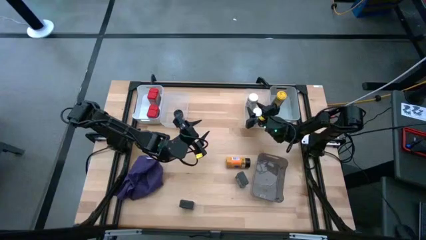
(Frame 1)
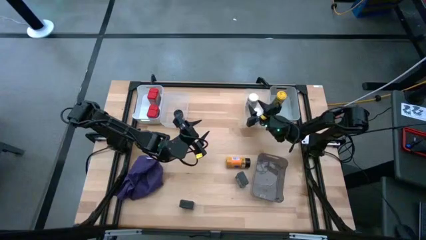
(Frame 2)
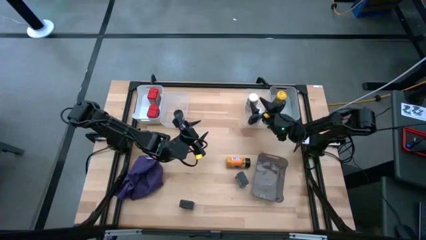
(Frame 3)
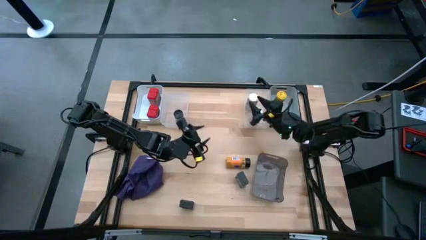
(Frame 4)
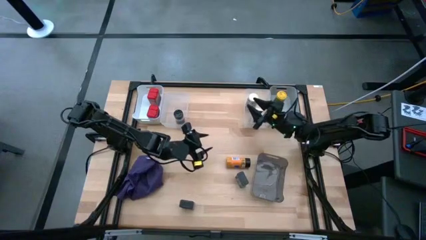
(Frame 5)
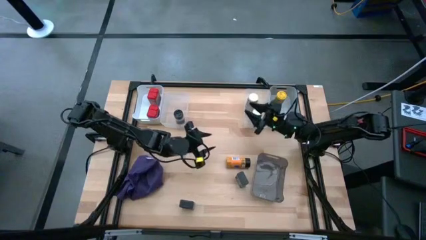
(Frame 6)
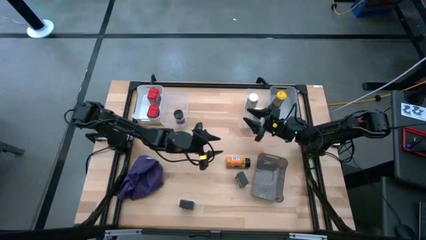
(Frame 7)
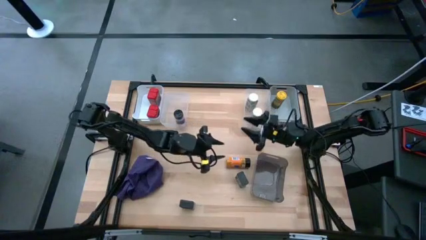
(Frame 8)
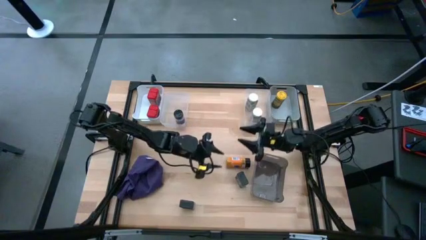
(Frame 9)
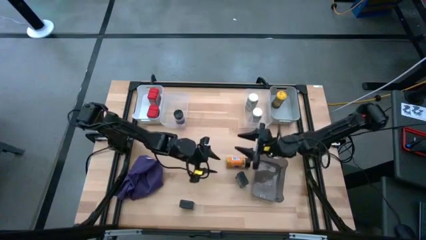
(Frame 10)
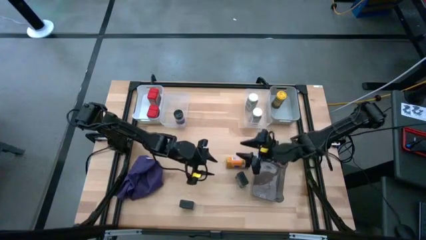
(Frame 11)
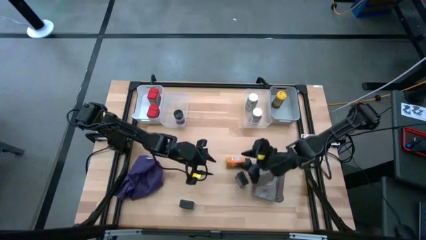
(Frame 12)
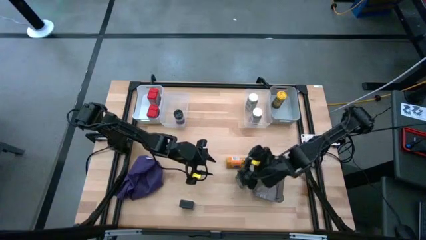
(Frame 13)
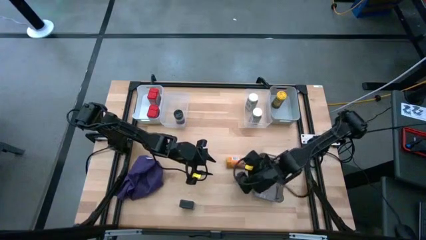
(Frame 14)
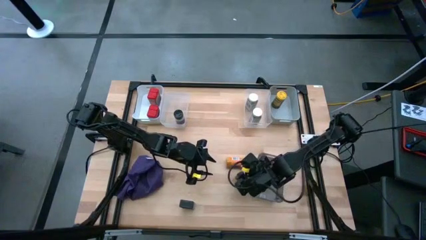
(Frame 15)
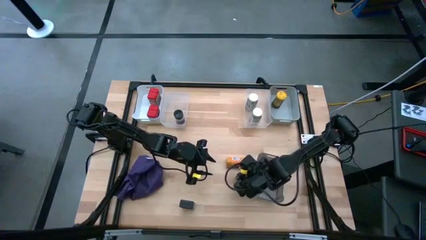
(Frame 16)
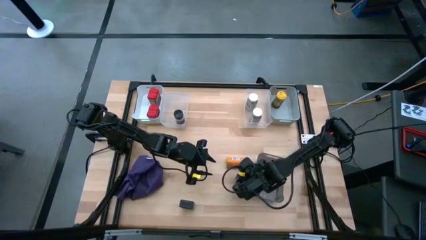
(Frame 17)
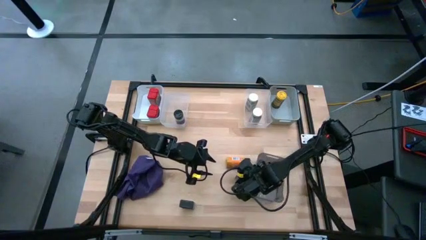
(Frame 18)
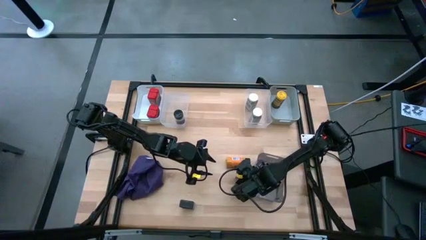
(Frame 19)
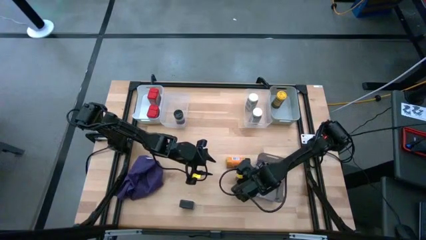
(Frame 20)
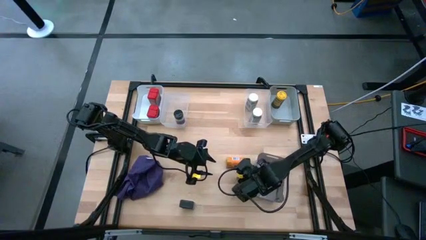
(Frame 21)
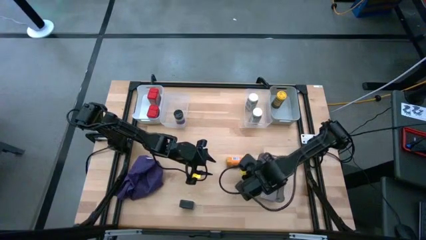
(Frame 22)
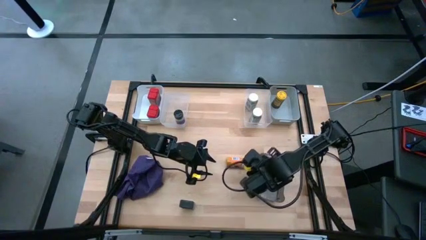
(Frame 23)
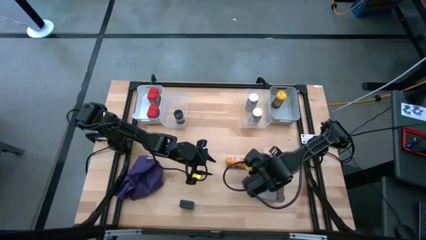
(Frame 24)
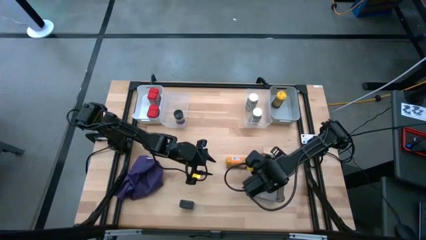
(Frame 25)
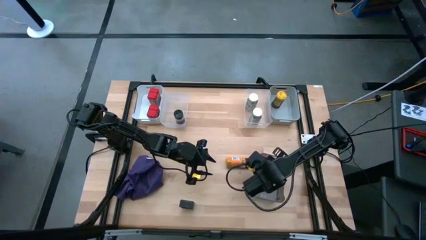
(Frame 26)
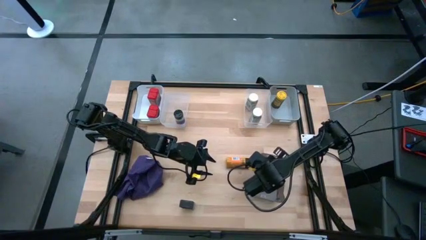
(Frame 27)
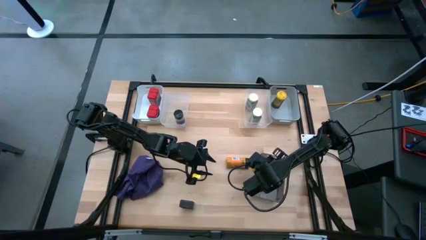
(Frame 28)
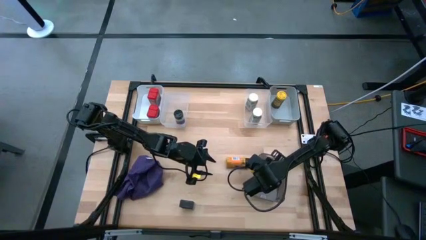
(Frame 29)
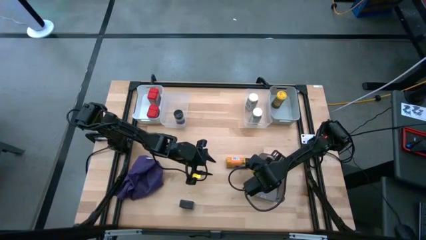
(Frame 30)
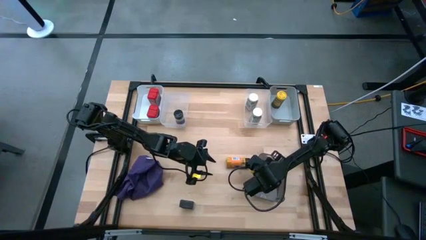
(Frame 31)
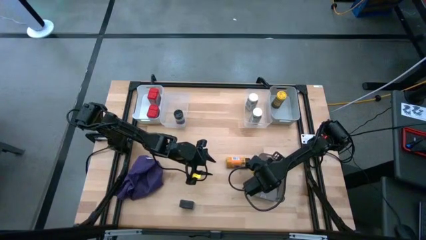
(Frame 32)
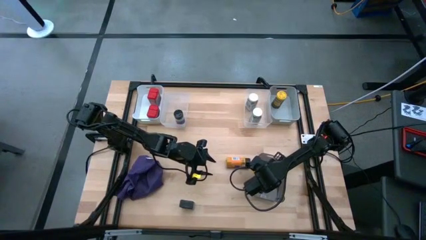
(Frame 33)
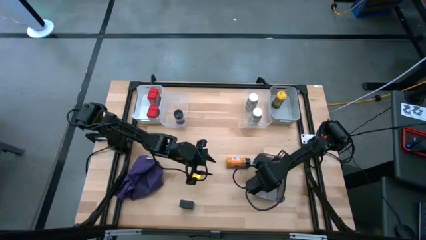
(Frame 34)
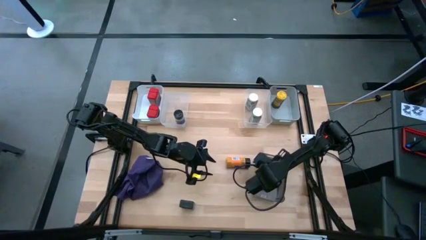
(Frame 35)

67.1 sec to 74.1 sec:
Task: Sort spices by type
Put the right green seasoning can into the black bin

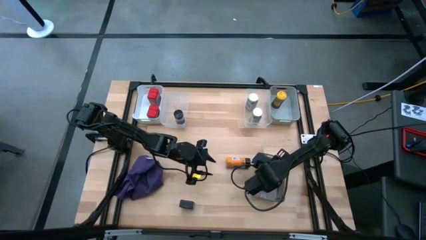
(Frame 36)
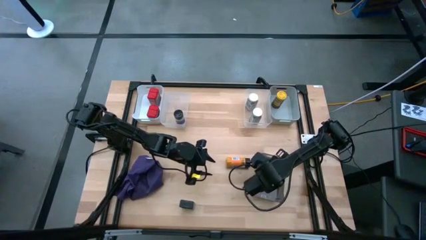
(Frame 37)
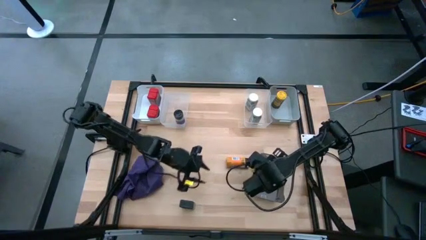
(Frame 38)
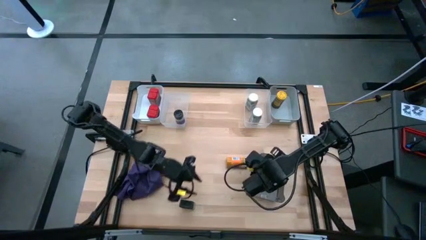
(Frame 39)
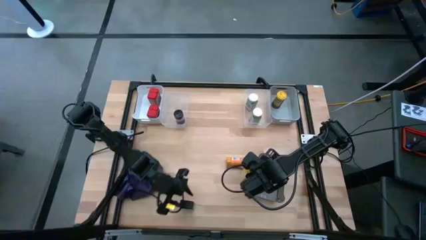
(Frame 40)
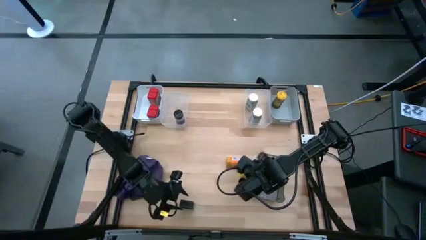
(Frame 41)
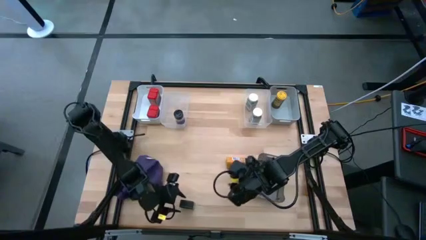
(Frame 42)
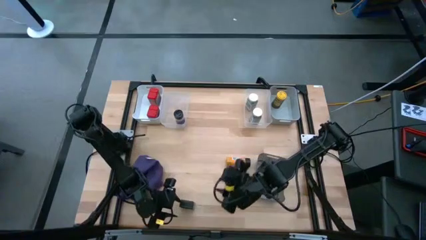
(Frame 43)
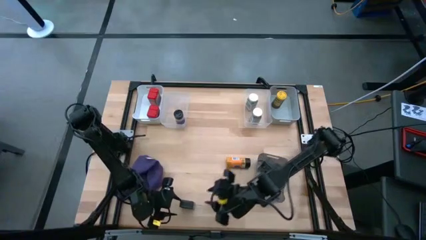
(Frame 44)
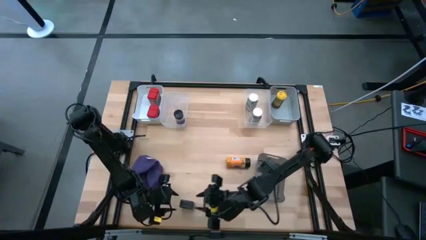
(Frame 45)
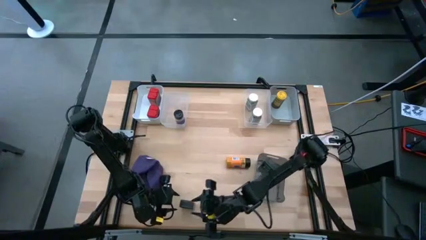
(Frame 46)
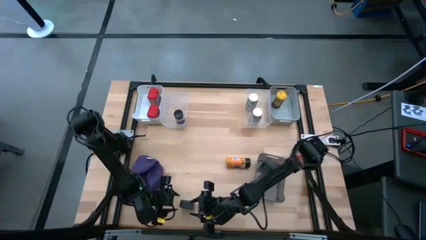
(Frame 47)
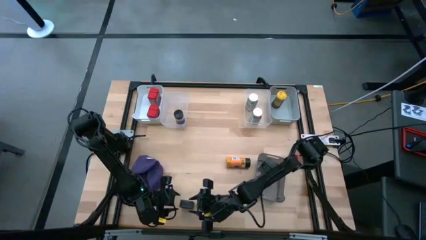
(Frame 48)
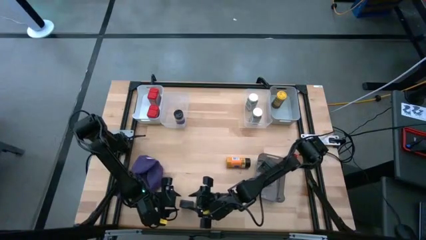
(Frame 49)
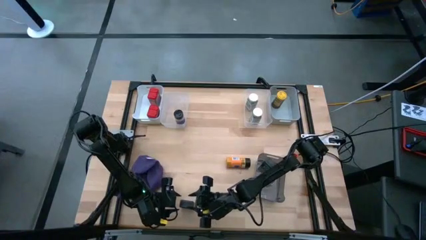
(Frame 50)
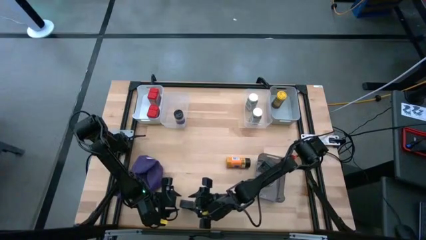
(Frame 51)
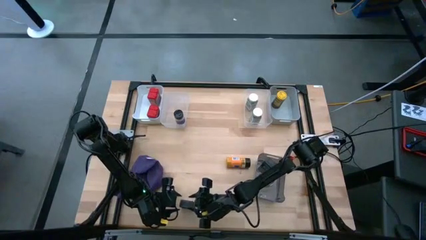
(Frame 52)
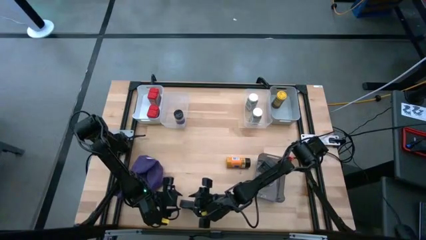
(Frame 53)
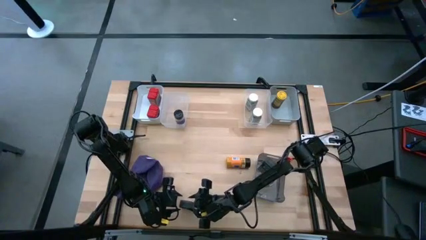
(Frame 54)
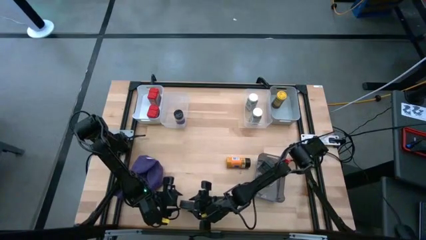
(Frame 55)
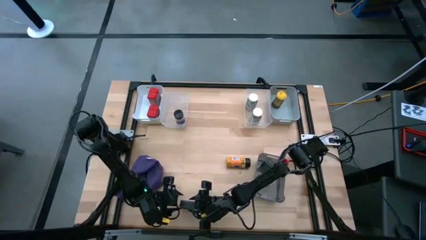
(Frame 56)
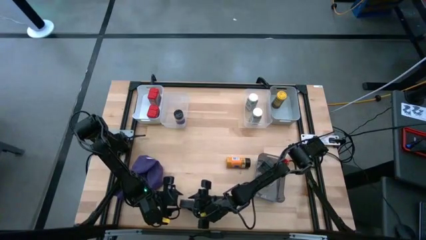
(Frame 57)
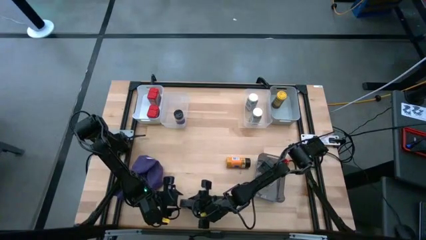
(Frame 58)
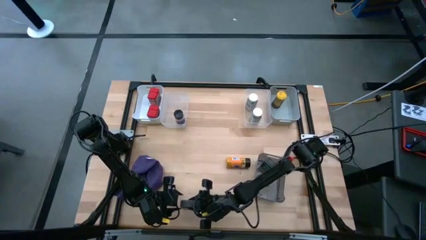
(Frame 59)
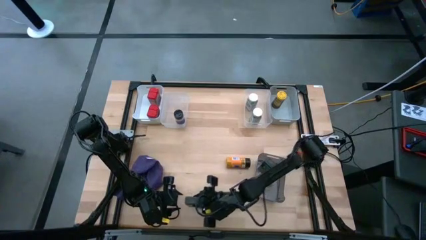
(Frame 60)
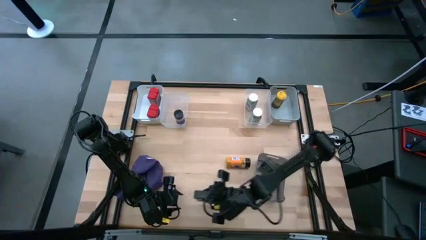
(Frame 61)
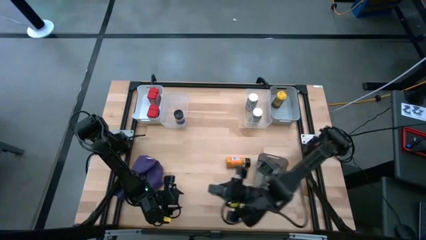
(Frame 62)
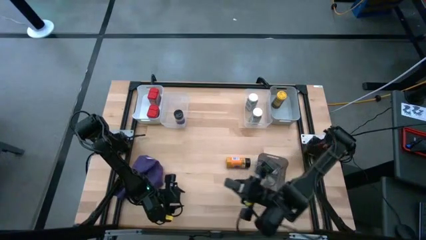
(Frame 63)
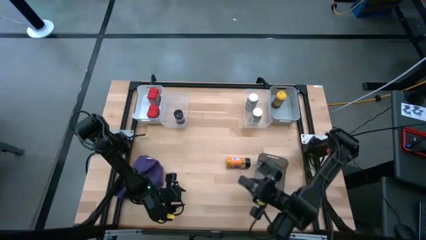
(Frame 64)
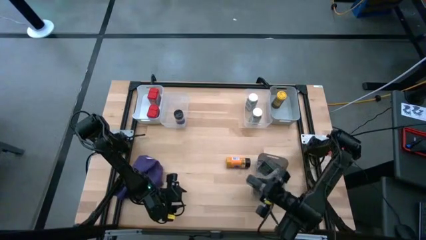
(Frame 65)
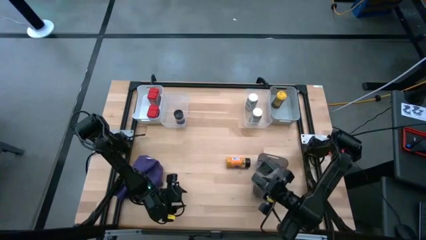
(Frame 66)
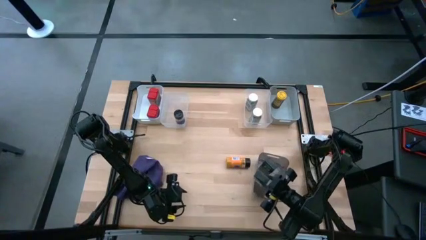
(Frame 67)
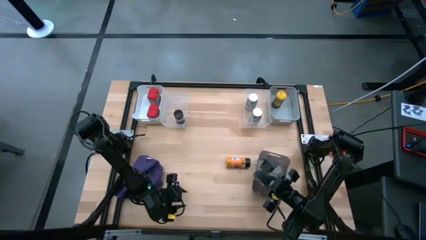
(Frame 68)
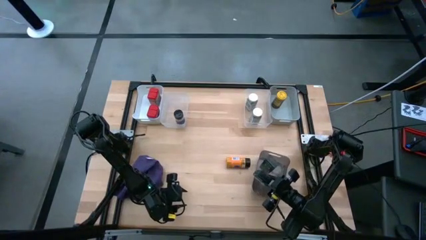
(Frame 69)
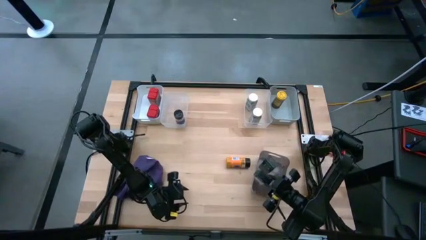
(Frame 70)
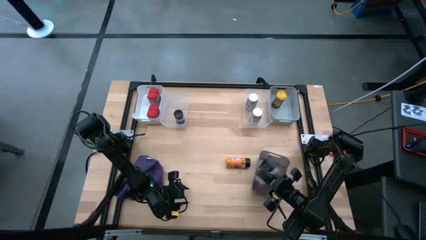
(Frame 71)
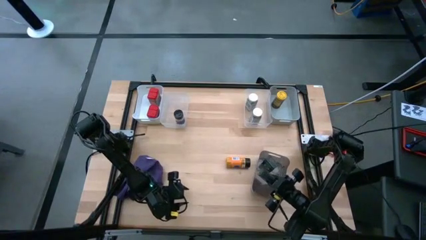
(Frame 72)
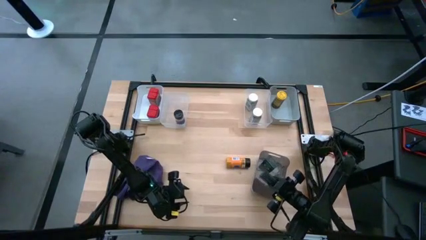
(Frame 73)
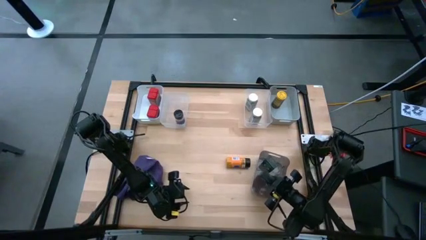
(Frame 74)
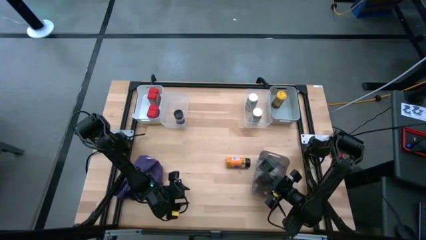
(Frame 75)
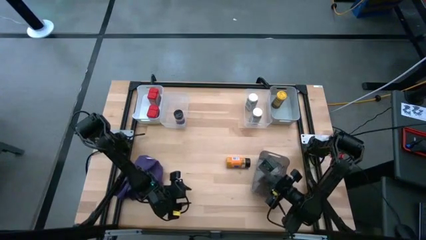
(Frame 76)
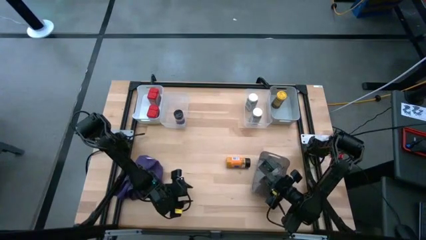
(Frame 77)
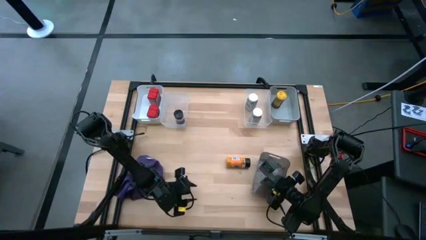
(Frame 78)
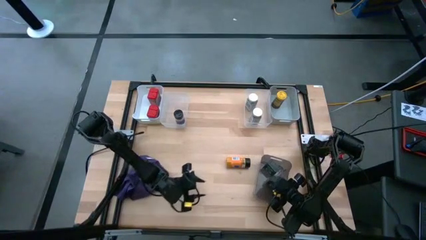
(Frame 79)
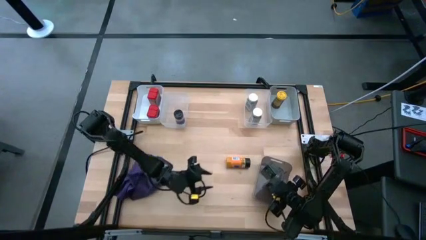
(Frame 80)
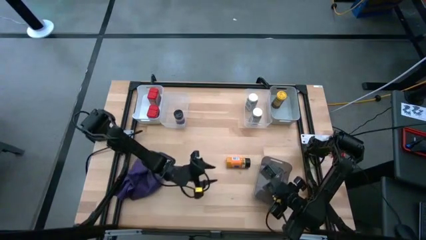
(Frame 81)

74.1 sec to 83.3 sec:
Put the green seasoning can into the black bin
